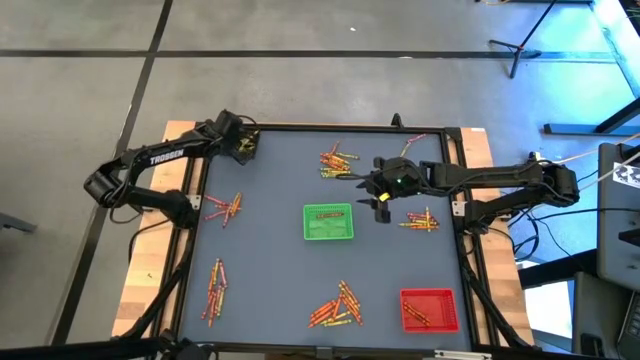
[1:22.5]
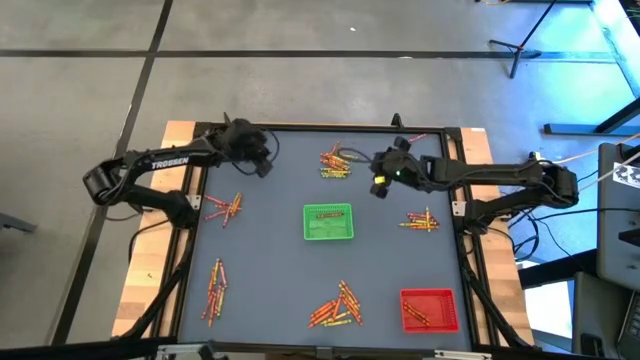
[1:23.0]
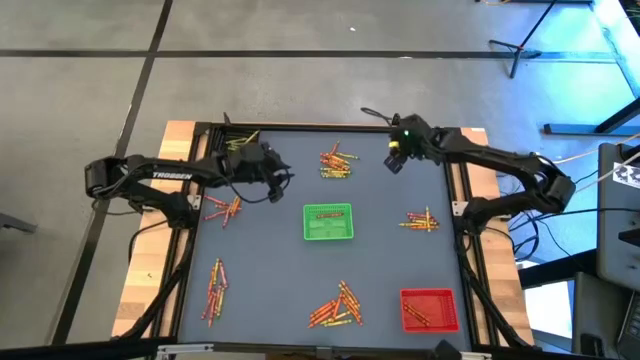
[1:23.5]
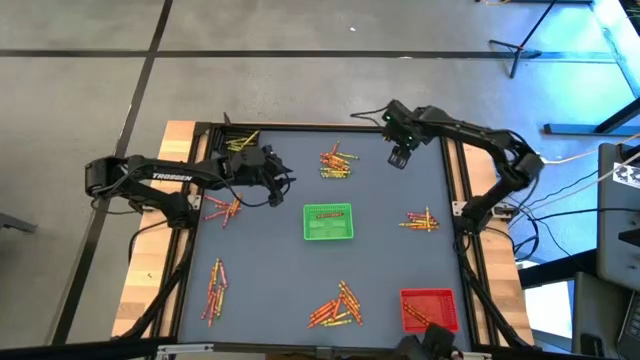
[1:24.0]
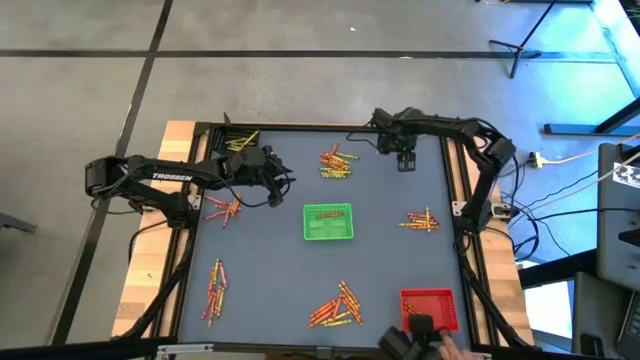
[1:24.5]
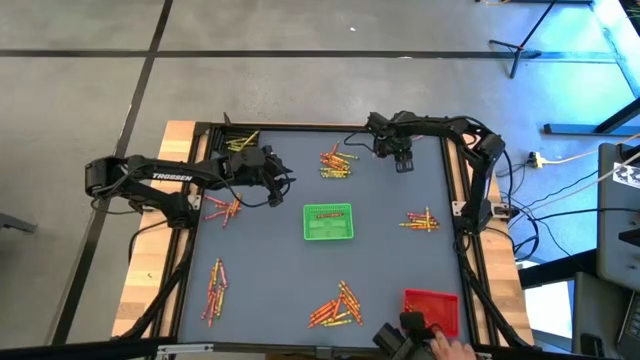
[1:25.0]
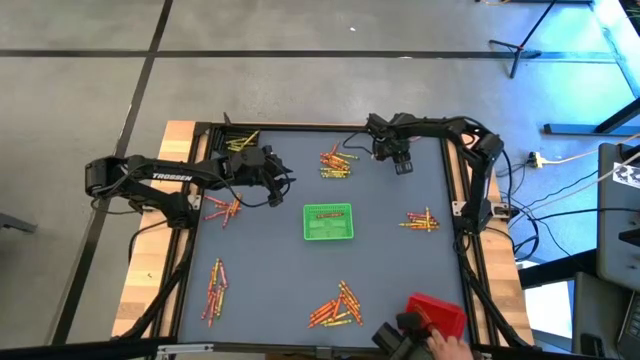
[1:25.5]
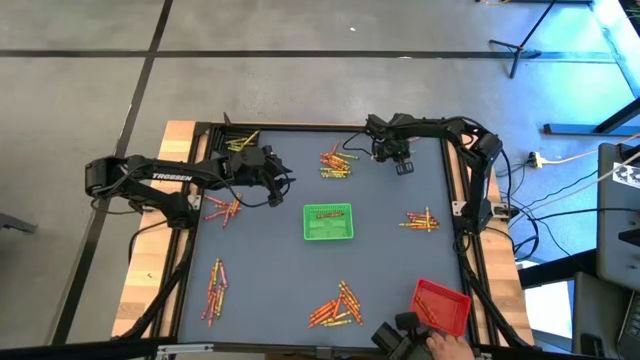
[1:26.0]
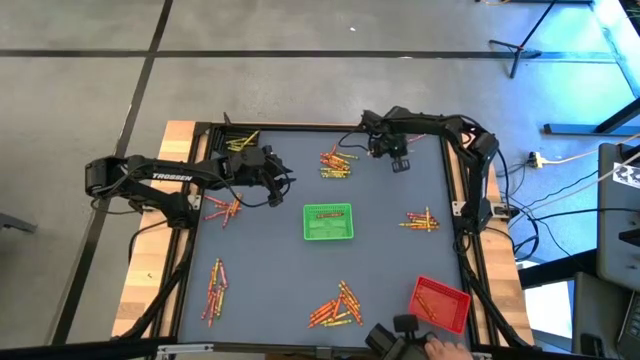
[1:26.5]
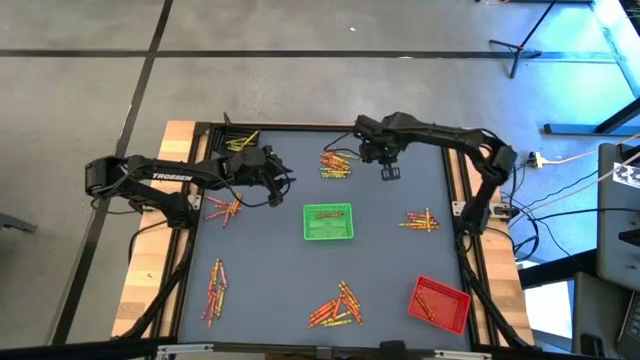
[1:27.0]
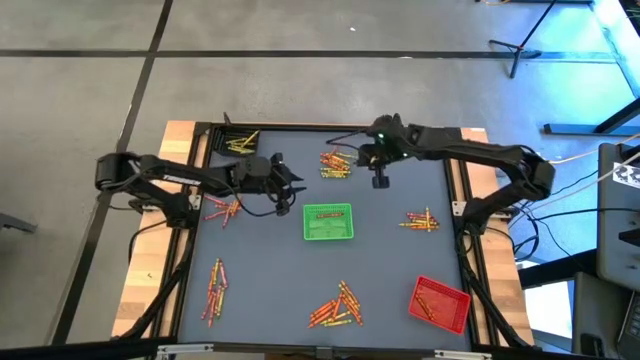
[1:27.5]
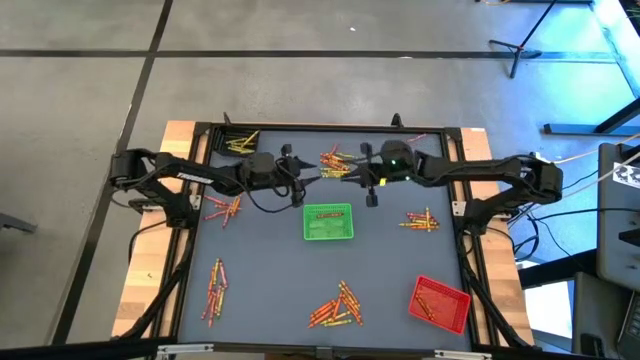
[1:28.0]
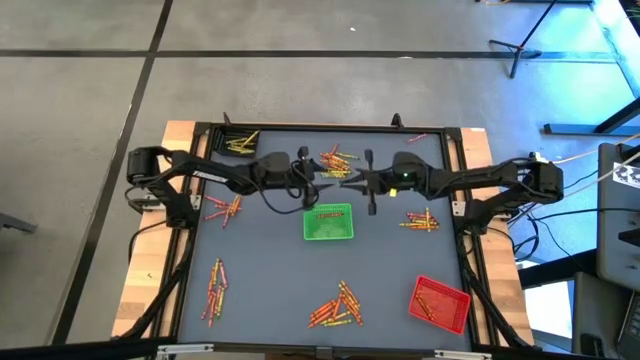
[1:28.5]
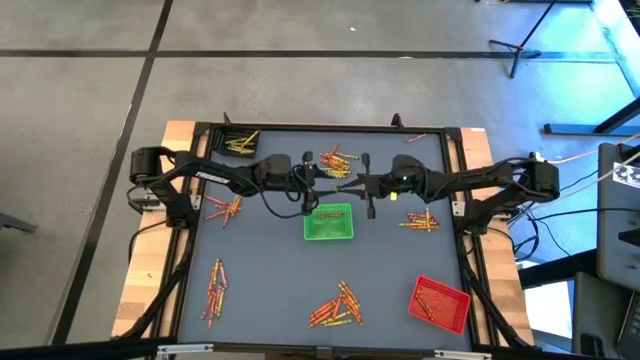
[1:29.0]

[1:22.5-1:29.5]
Task: Sort crayons
Put the green crayon into the black bin

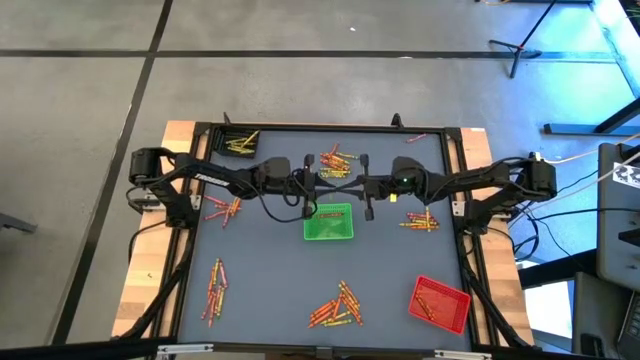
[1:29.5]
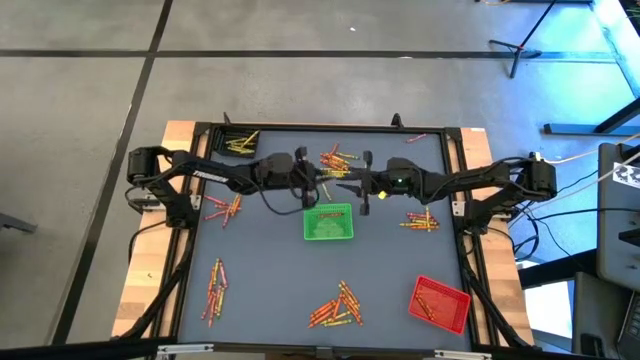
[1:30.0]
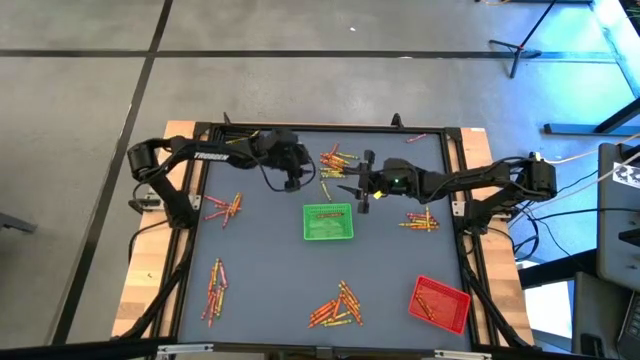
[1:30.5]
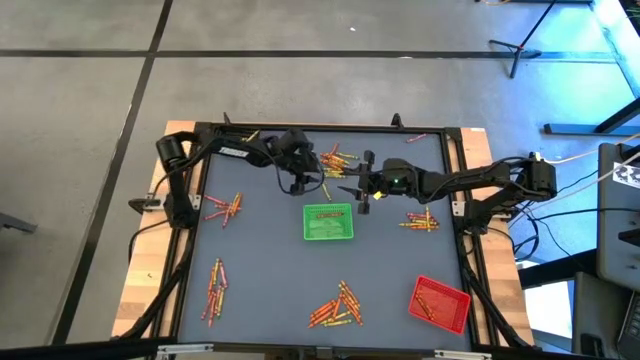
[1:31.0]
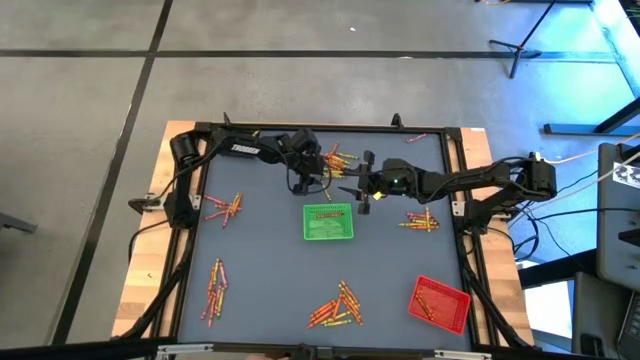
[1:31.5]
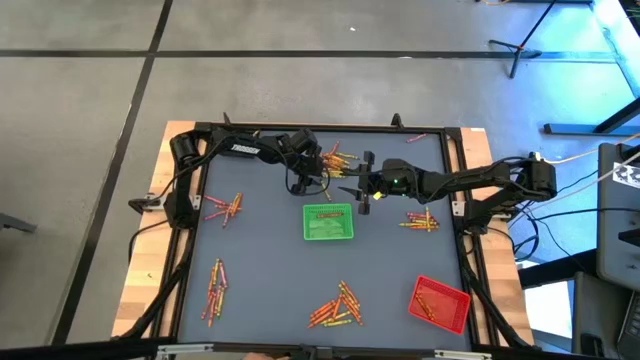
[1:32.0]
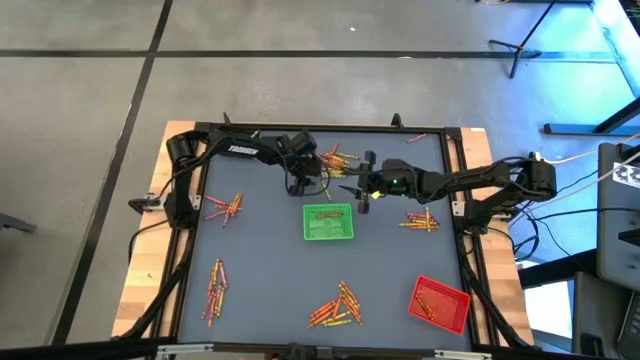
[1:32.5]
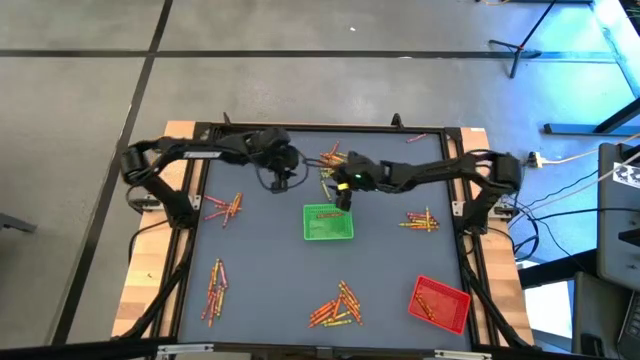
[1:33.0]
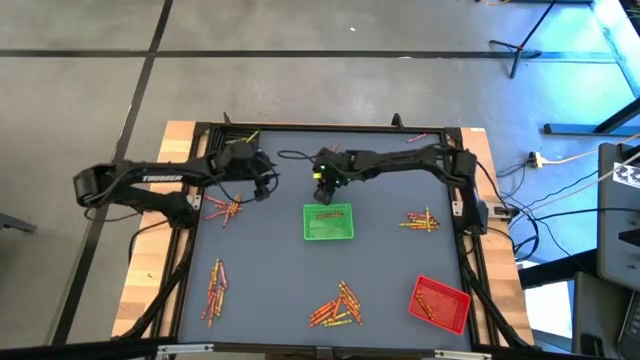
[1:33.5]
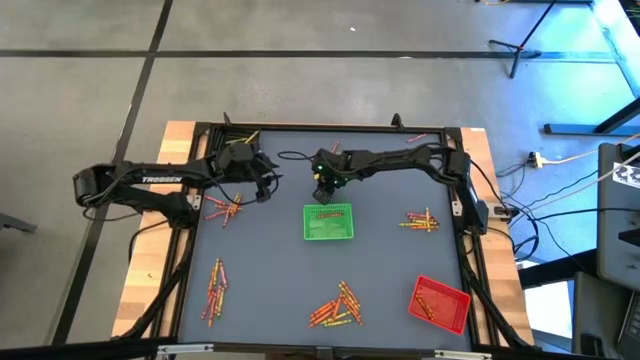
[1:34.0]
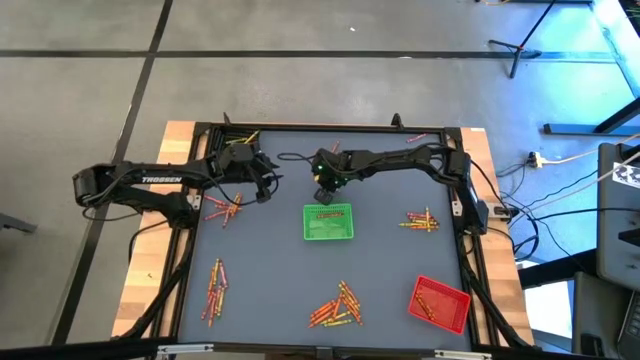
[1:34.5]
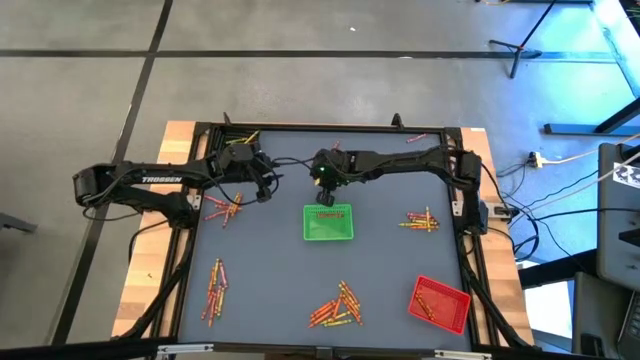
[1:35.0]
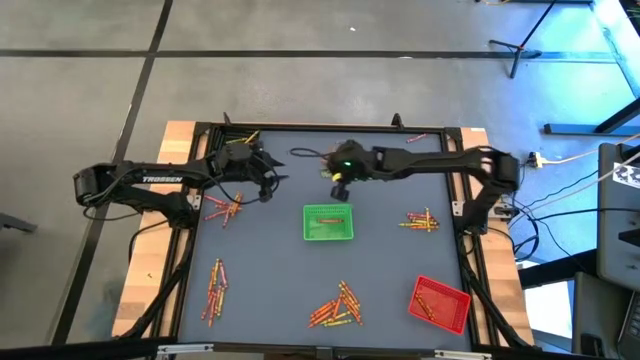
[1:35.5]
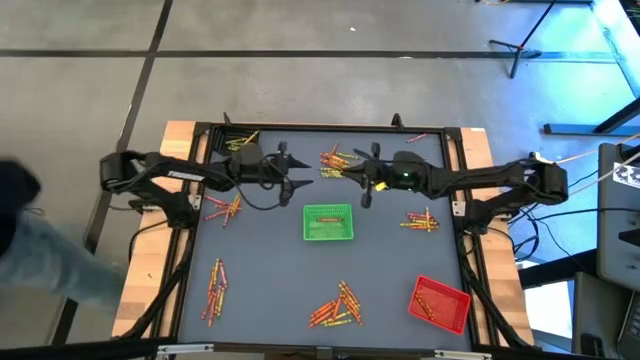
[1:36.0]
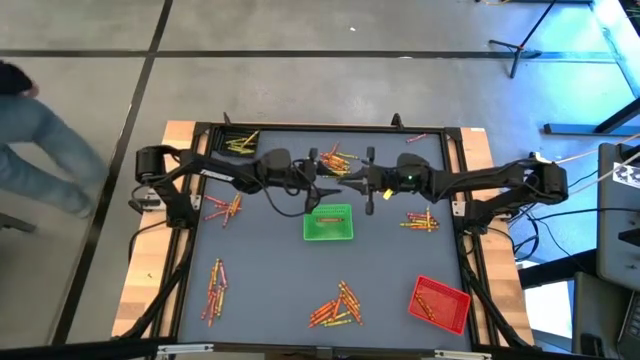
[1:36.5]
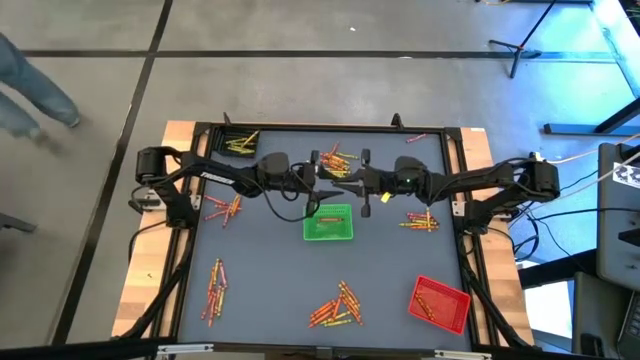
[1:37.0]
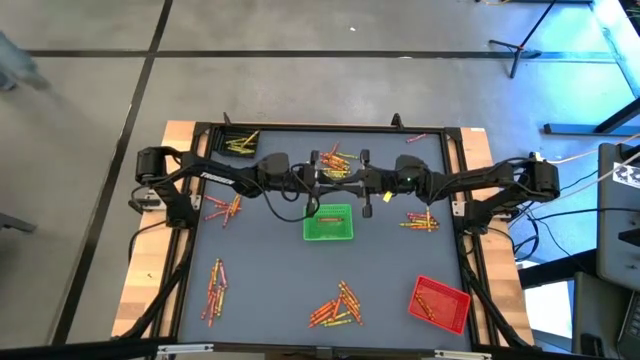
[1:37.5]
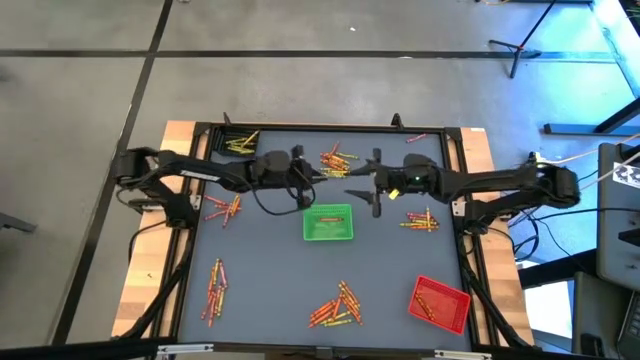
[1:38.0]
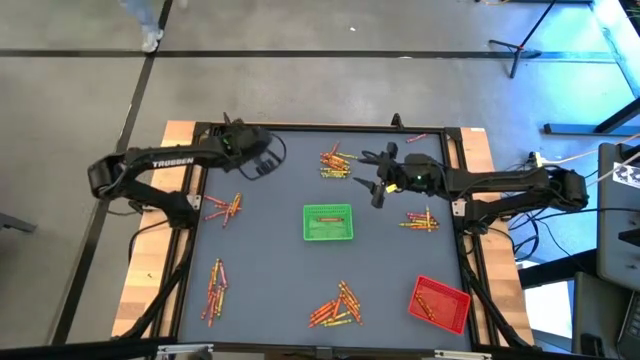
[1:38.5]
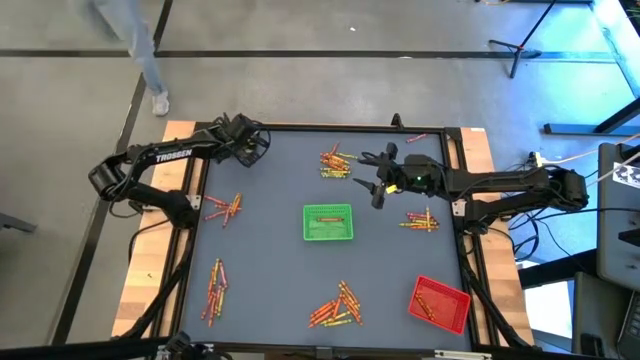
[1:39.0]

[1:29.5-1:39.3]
Put the green crayon into the black bin

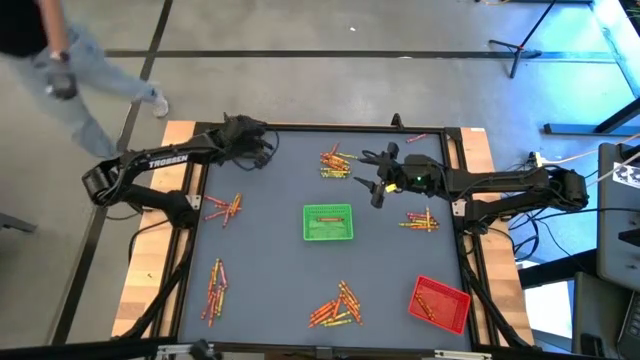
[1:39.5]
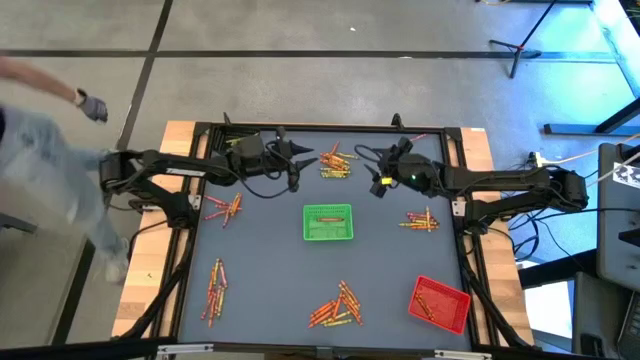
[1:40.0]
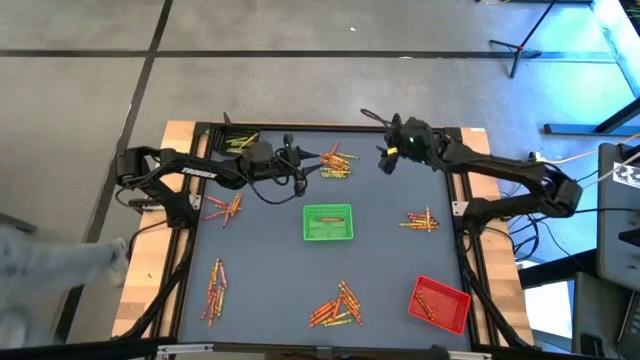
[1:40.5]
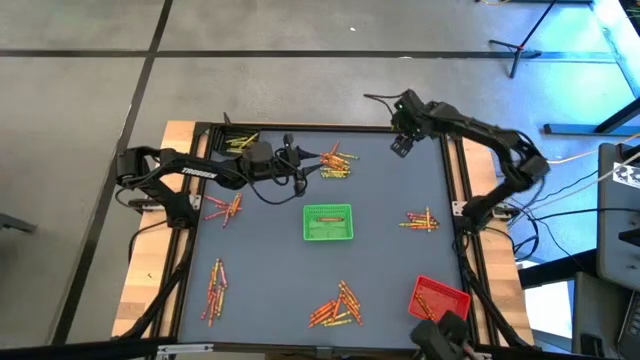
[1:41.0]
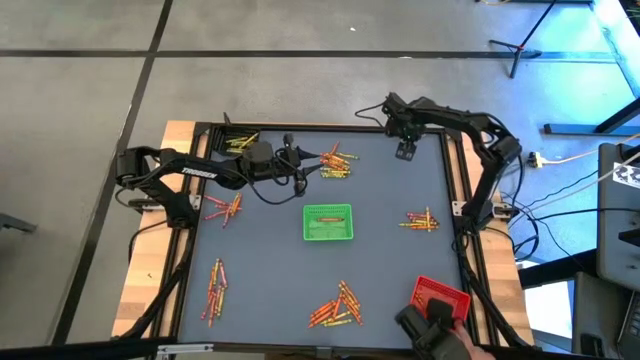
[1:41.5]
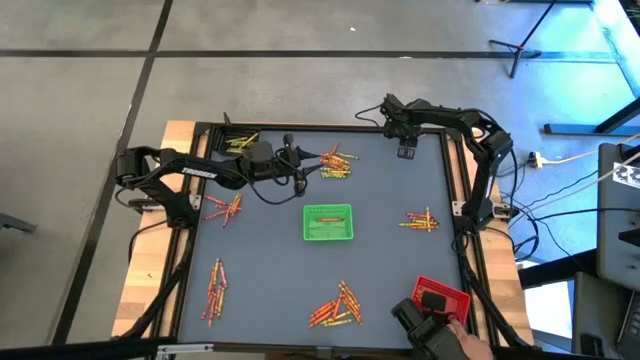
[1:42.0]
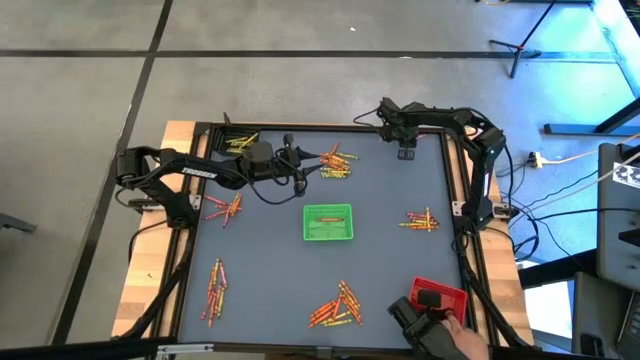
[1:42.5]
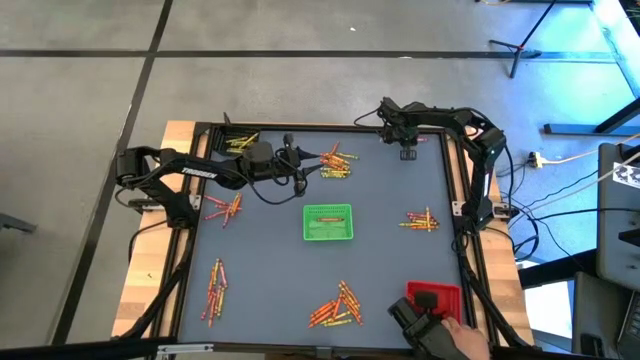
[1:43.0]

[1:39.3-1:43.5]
Put the red crayon into the green bin
